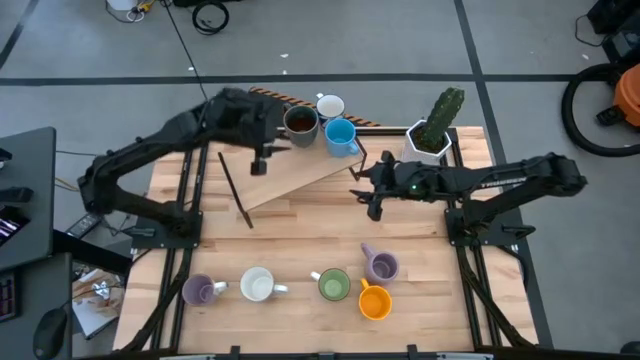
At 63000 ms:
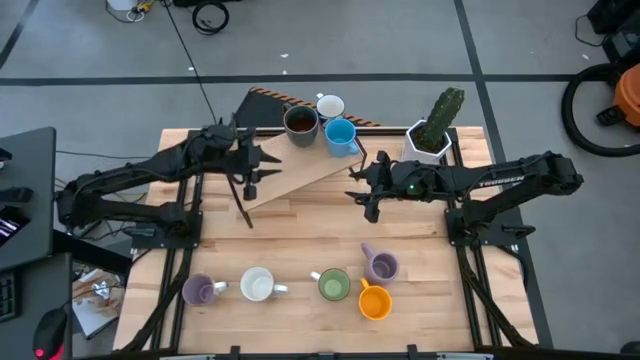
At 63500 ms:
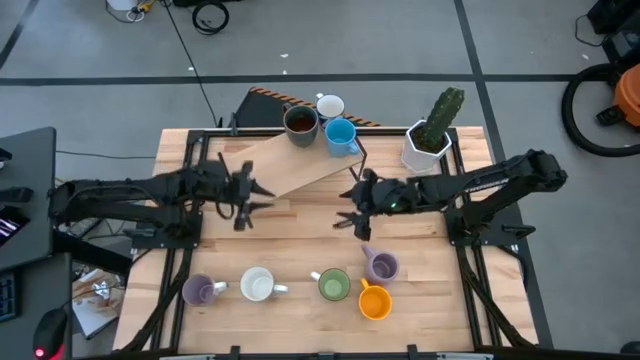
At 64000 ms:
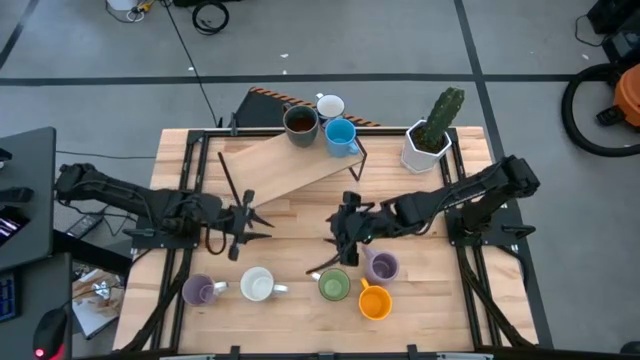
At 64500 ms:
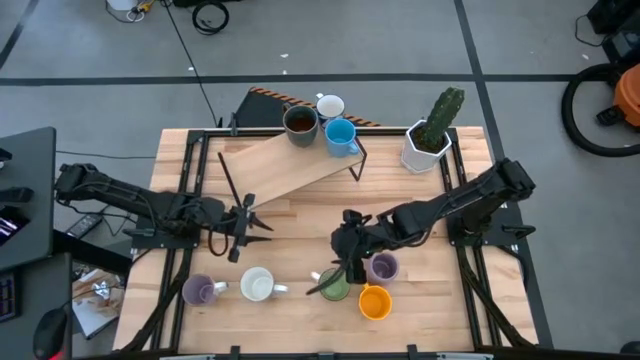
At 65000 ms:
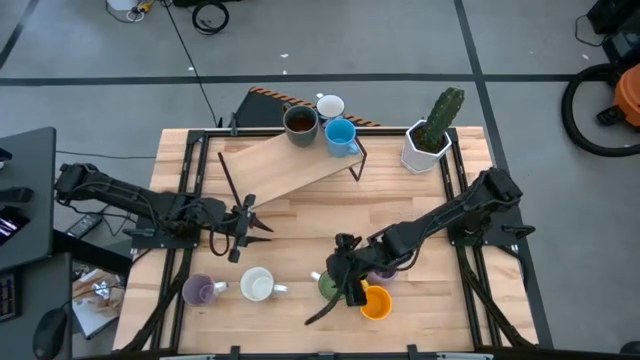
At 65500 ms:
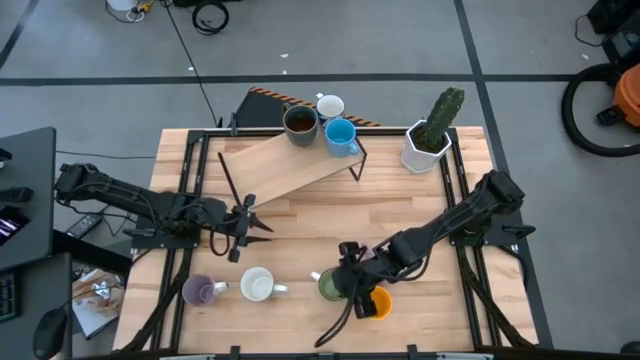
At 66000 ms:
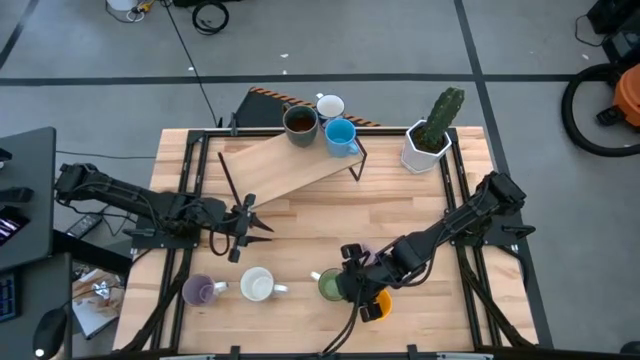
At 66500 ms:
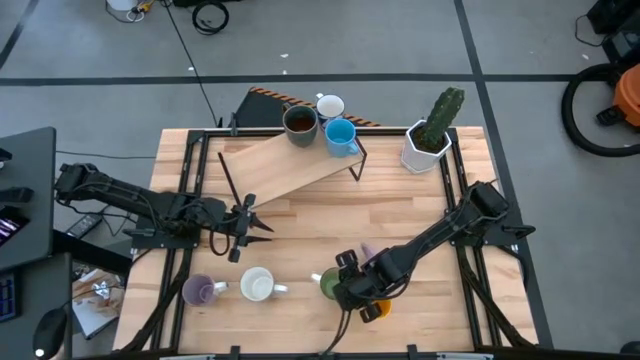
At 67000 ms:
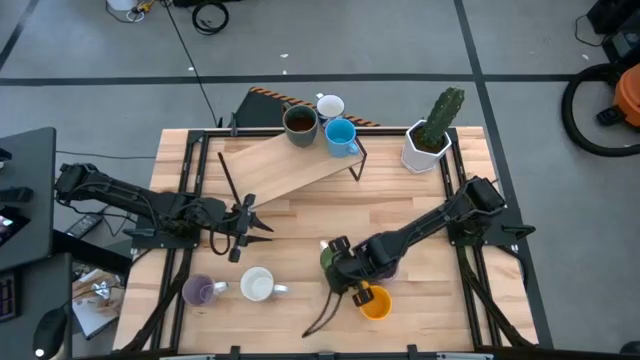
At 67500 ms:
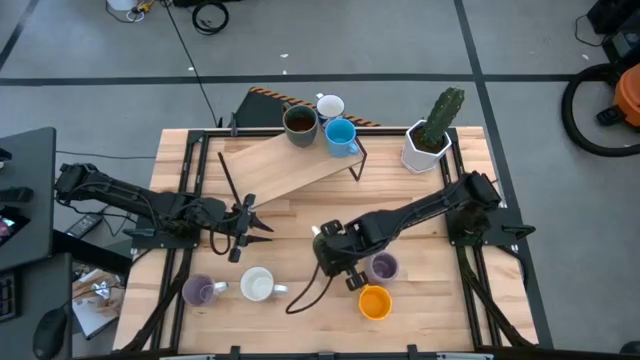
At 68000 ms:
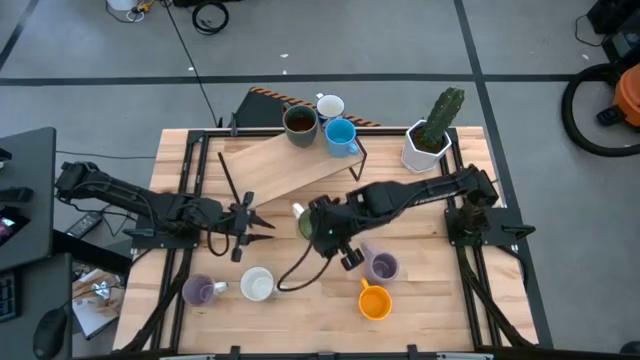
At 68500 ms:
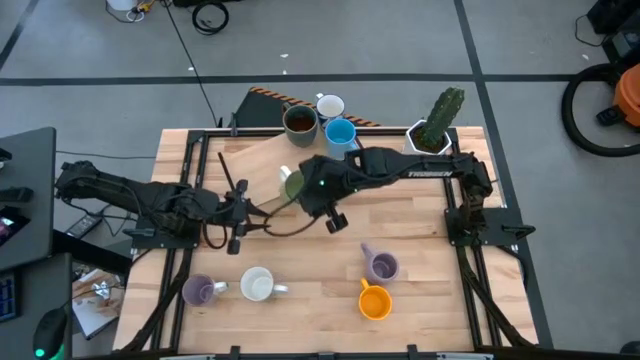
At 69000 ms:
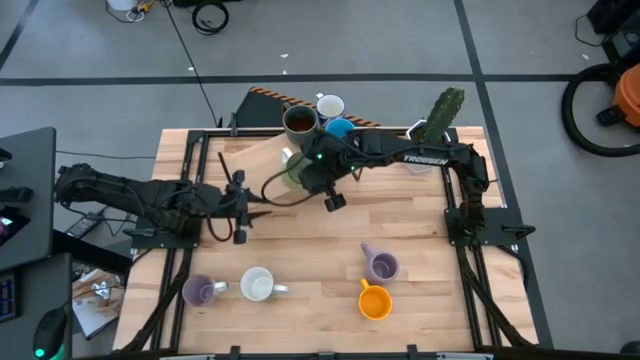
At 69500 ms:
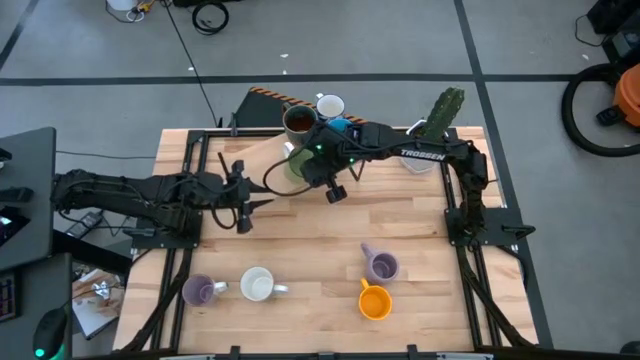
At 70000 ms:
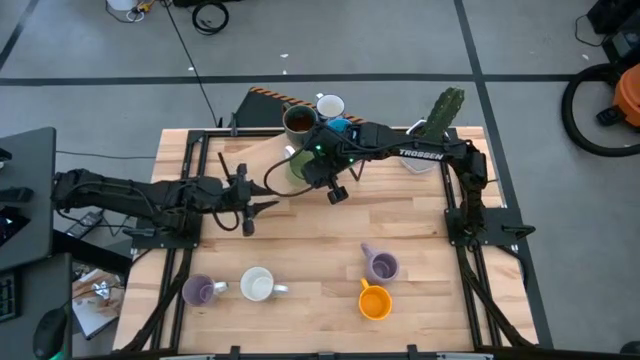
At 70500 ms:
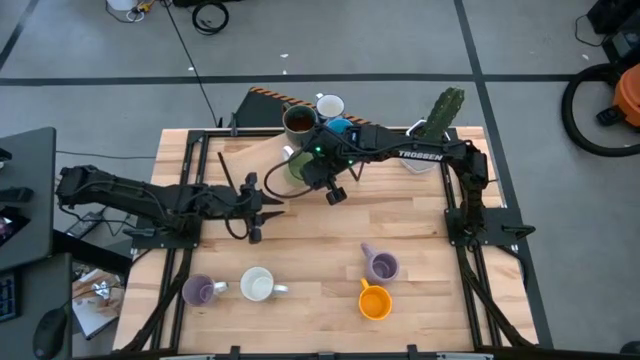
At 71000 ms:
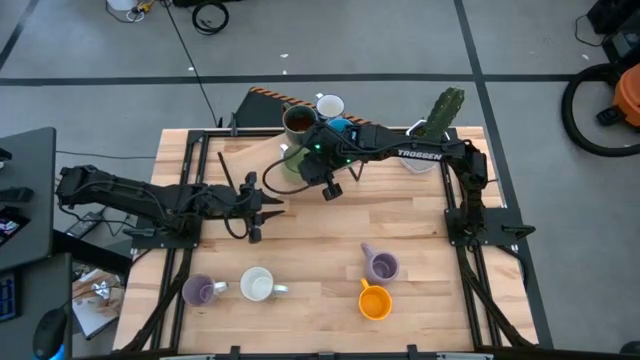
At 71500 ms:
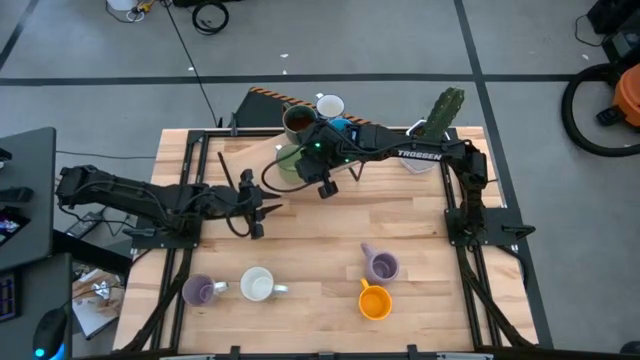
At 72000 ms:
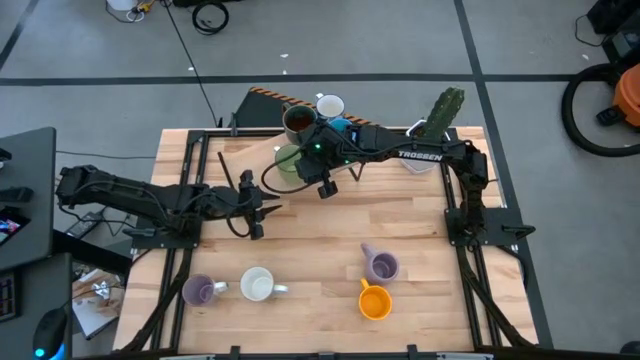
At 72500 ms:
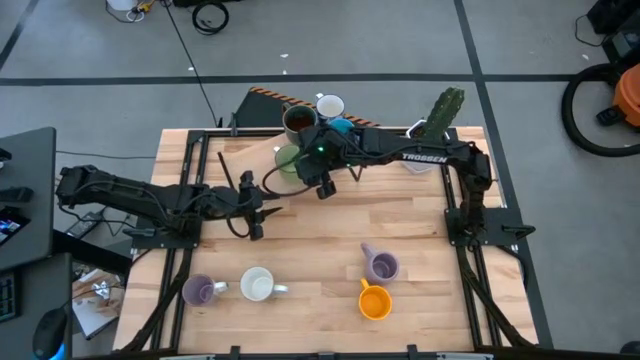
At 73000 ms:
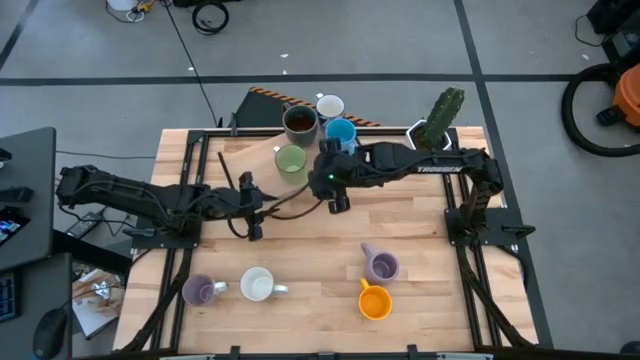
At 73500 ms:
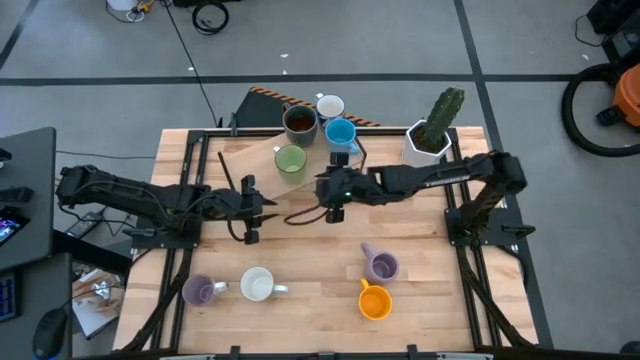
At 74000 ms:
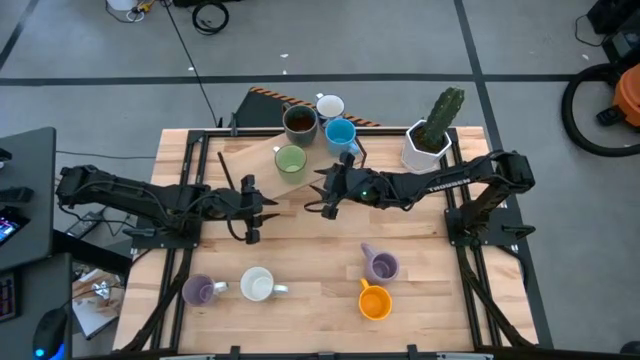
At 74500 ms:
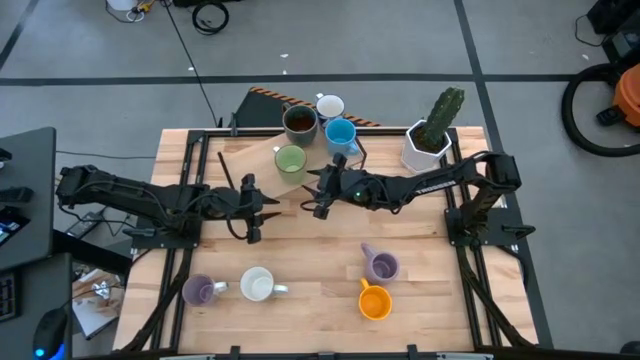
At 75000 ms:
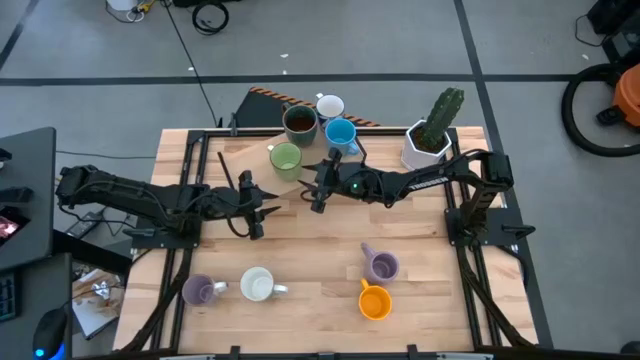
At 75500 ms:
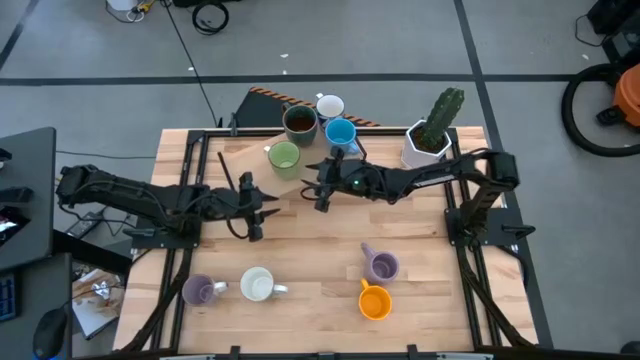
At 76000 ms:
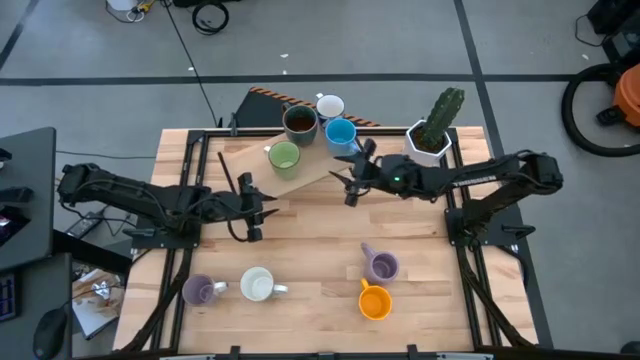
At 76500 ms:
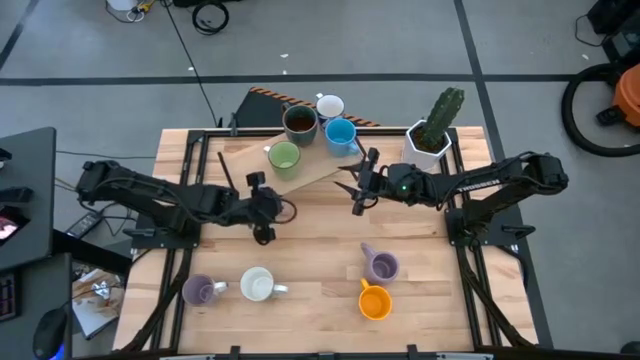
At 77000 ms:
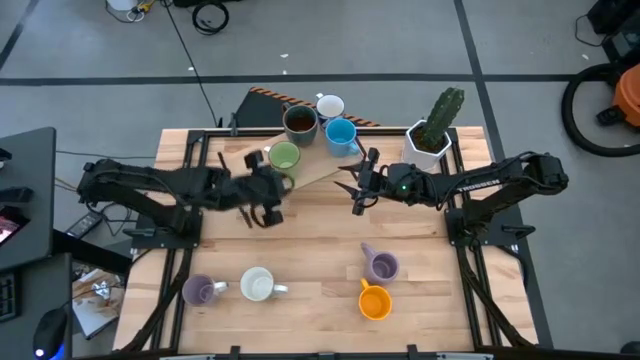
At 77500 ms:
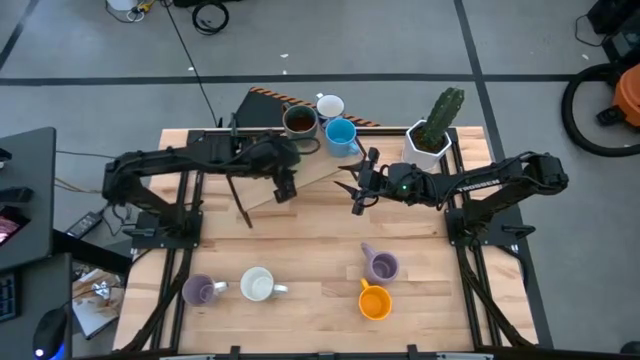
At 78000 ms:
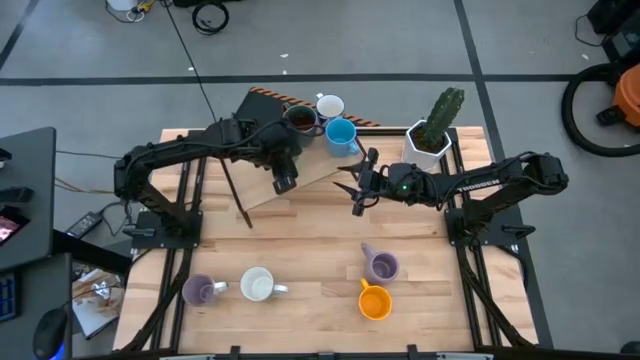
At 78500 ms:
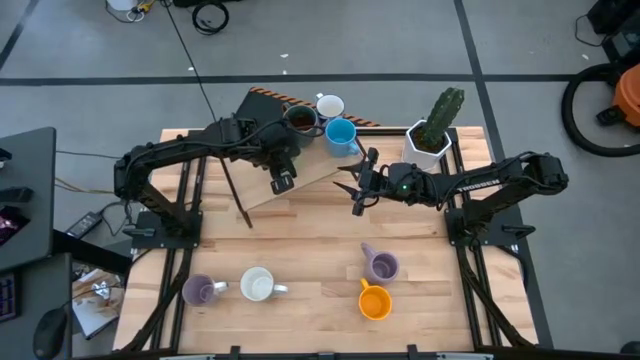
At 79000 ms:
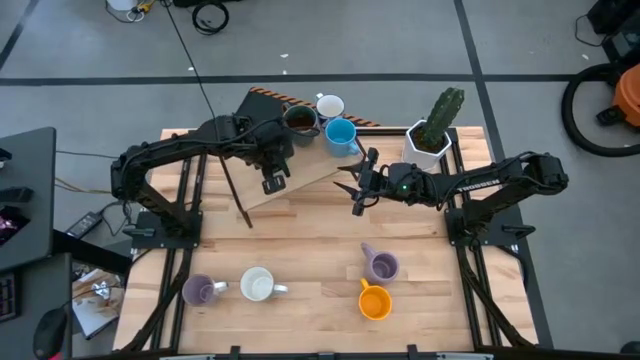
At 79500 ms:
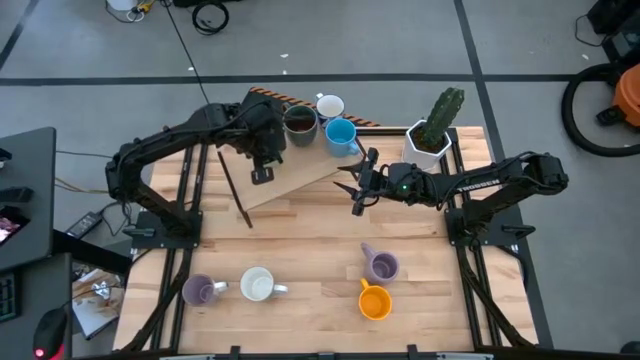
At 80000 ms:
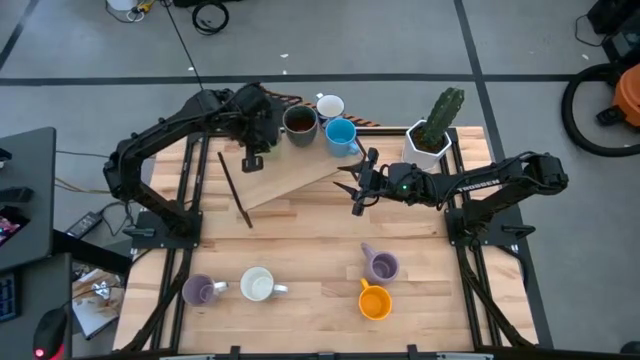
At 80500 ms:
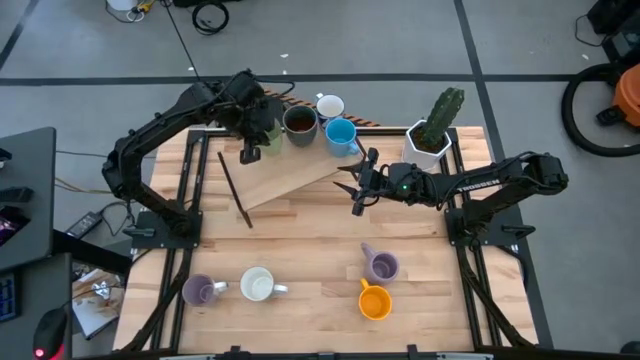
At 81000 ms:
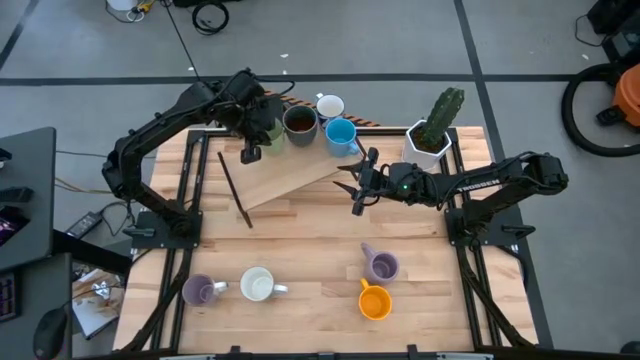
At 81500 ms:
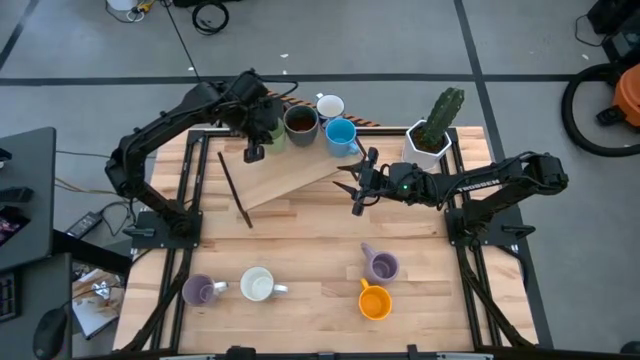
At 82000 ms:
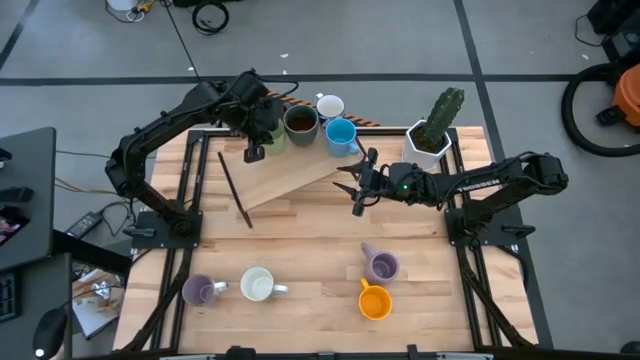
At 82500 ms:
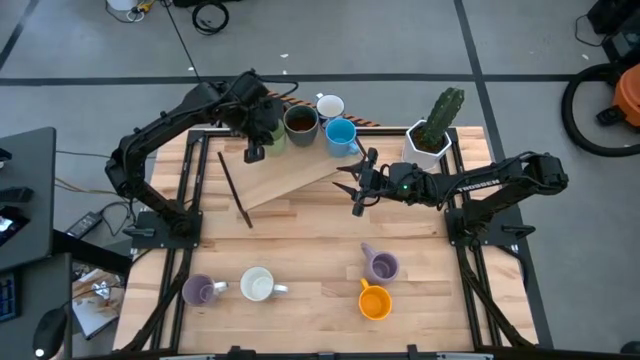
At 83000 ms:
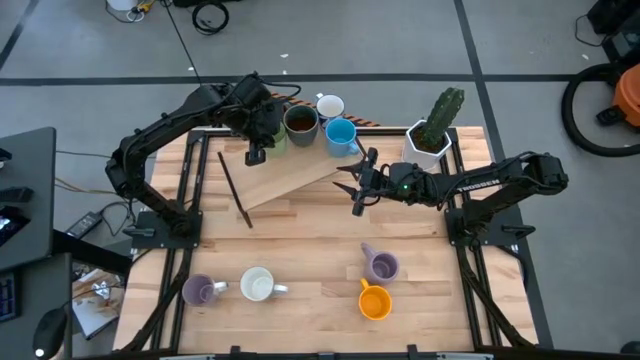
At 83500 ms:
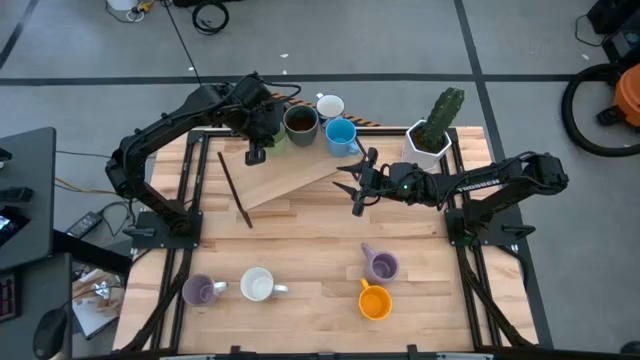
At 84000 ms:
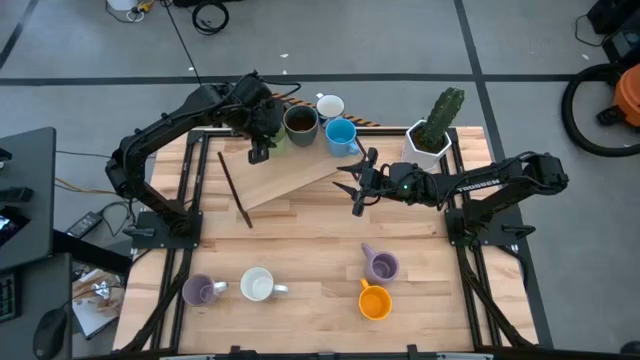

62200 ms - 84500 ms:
Task: Place coffee mugs
Put the stripe green mug on the shelf
